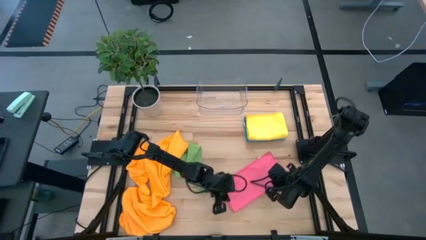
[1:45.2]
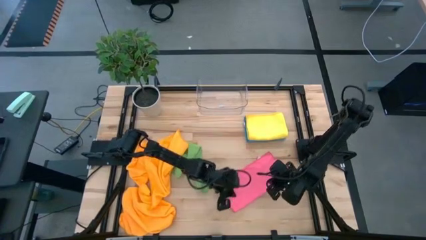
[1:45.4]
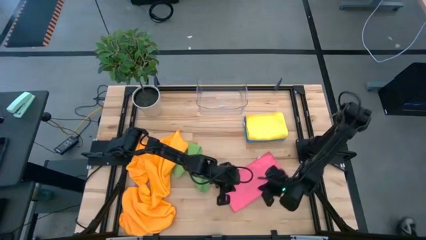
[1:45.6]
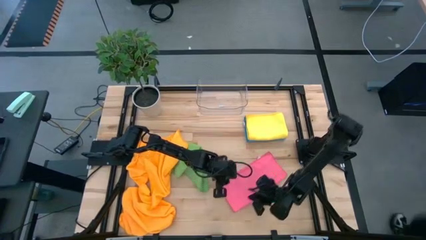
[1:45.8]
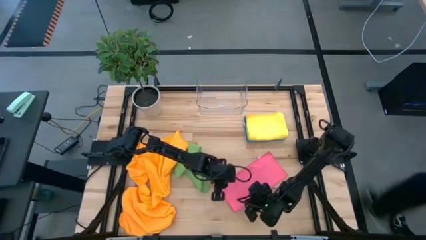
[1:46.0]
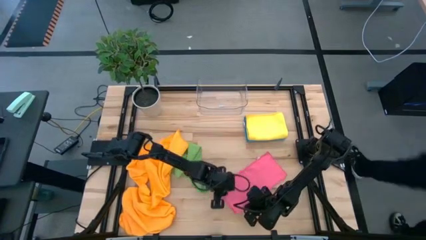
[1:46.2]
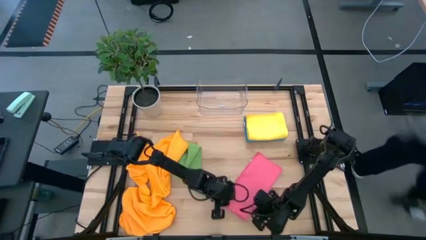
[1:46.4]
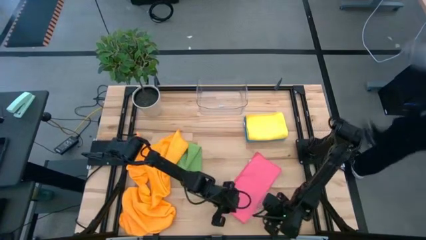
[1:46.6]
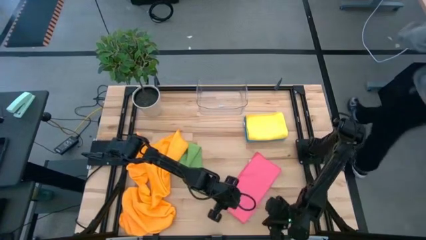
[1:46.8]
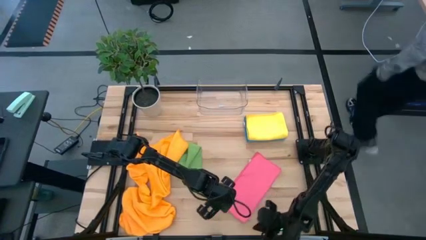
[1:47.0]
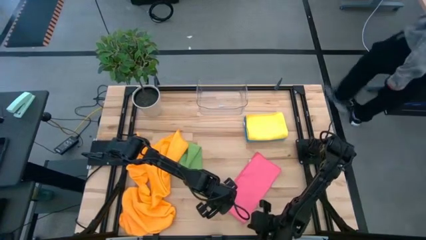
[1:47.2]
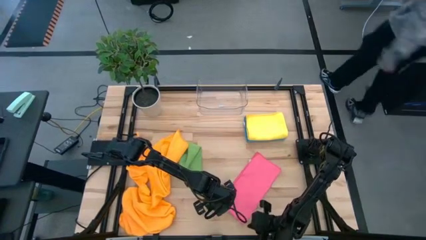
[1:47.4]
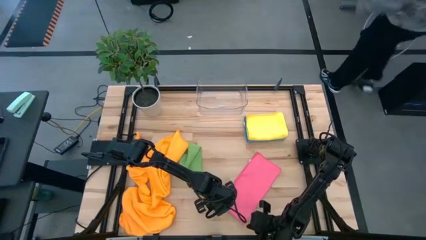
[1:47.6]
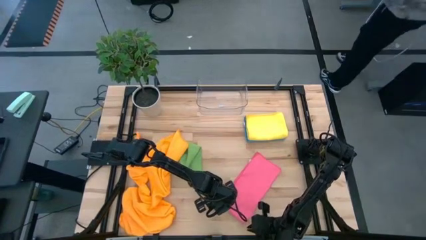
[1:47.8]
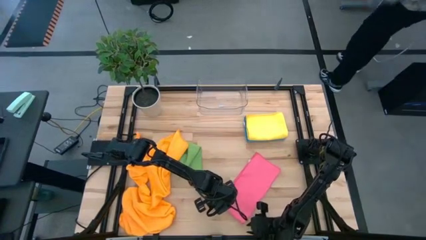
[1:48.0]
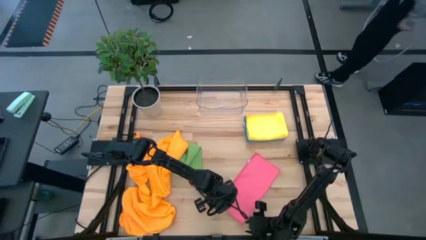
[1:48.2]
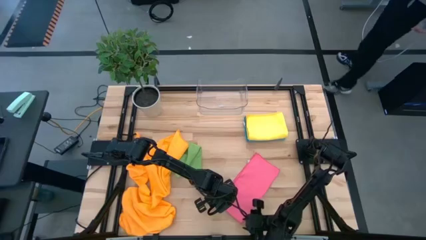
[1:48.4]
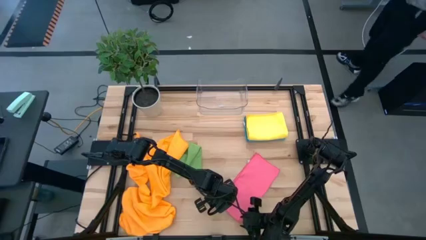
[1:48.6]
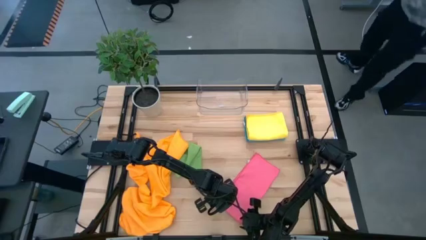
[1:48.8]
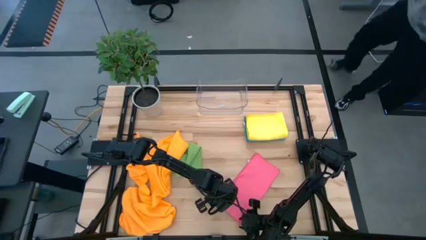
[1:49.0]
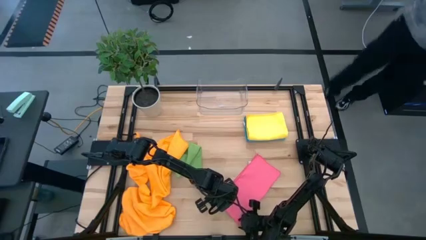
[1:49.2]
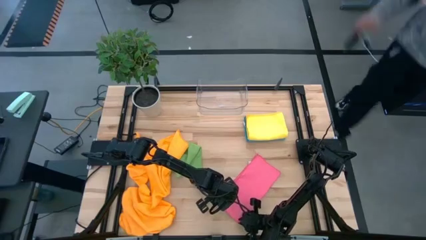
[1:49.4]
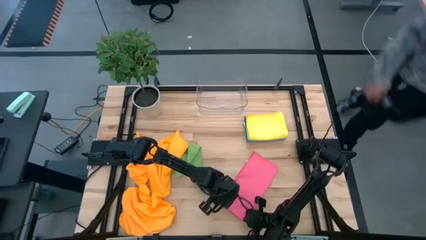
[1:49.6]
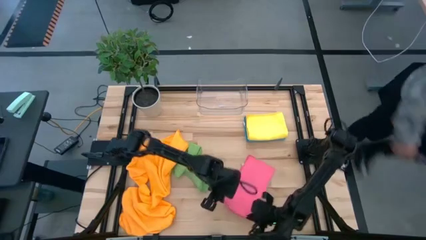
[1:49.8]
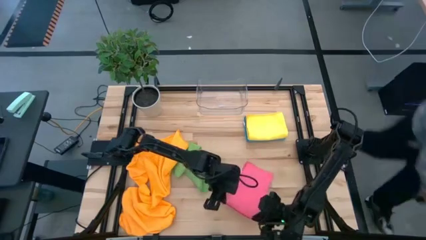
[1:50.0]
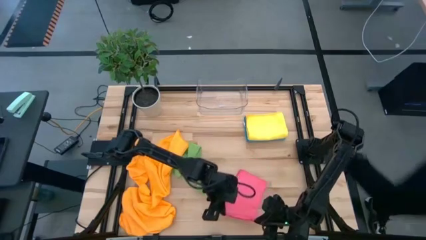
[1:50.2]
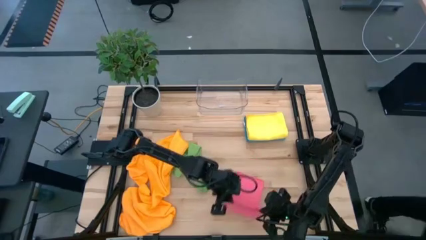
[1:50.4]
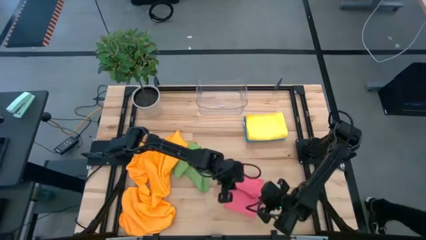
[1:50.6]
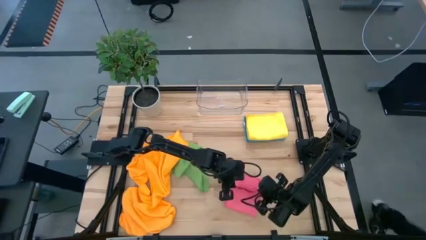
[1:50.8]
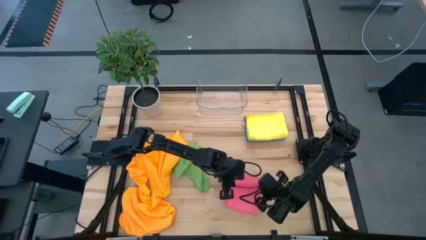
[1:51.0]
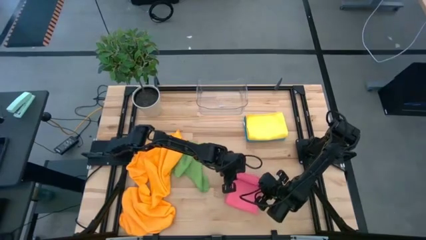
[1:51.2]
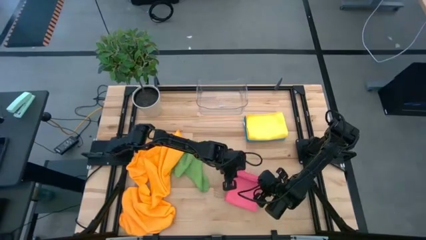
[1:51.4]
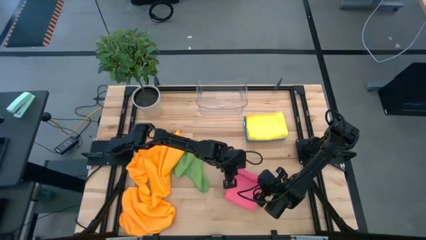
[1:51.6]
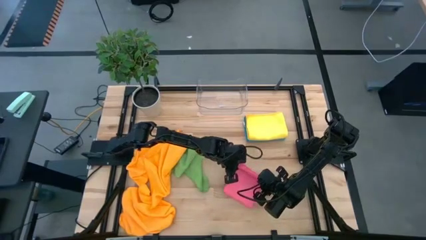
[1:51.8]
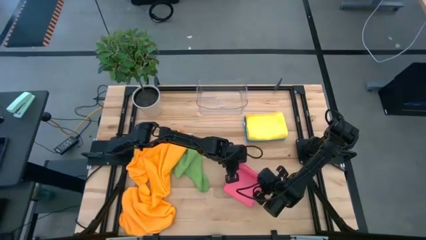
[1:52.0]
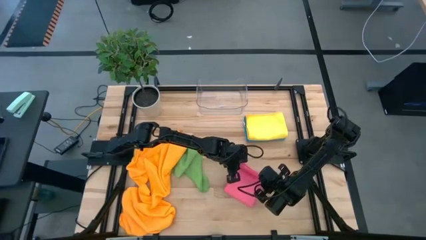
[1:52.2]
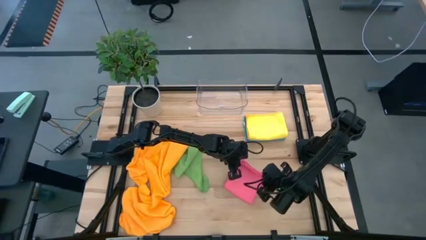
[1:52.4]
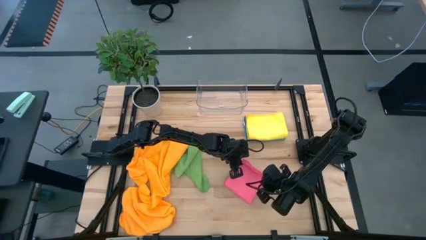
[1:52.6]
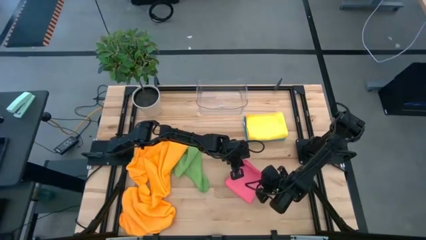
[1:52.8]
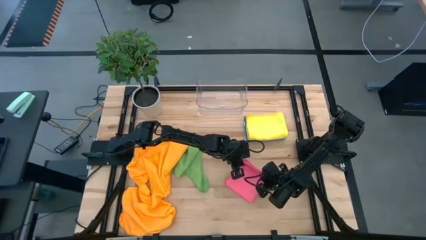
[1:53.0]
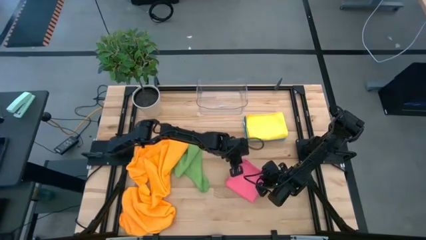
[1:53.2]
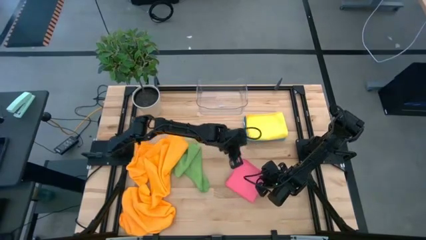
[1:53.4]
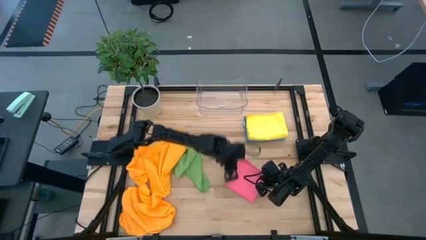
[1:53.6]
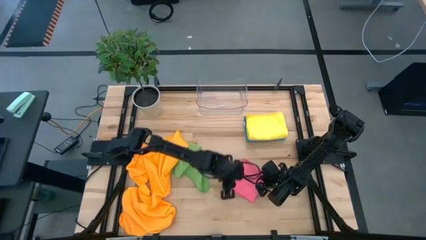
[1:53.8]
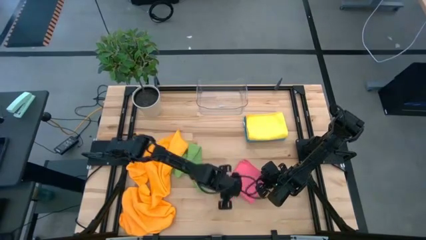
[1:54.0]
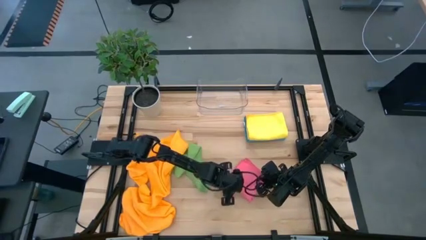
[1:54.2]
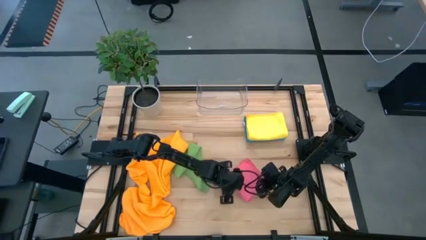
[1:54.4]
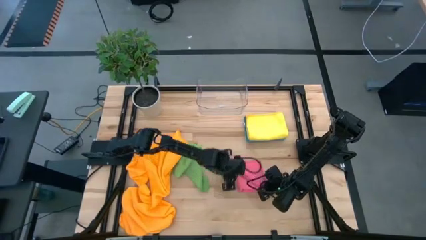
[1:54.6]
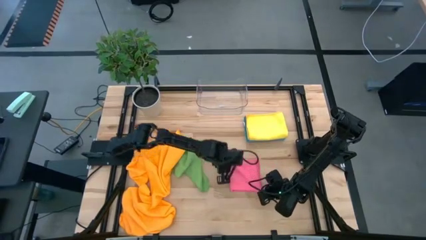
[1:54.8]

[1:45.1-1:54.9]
Task: Fold microfiber towels
Fold the pink towel

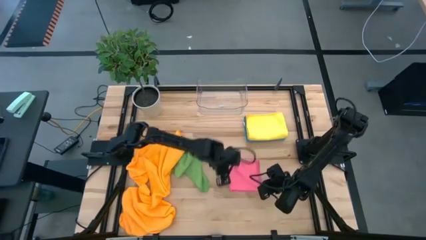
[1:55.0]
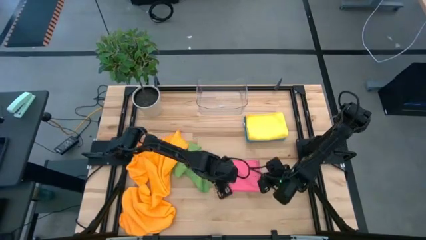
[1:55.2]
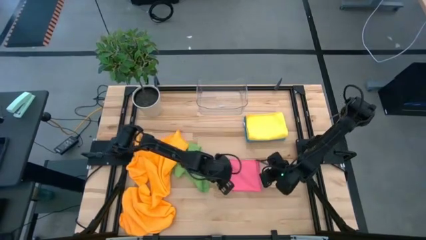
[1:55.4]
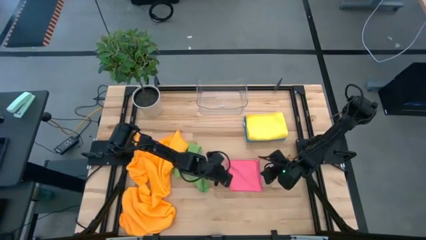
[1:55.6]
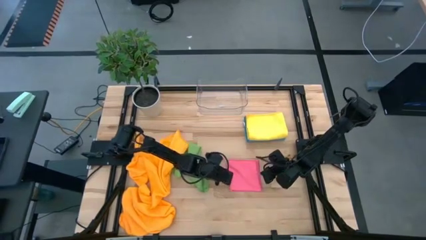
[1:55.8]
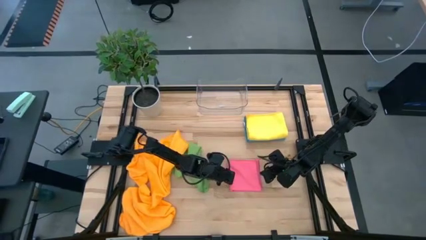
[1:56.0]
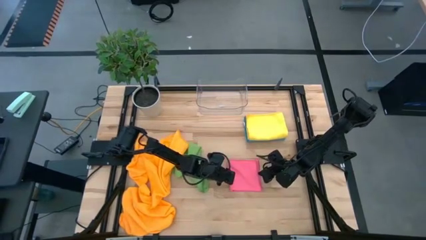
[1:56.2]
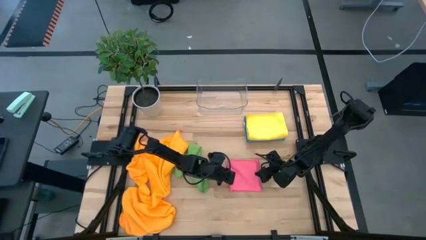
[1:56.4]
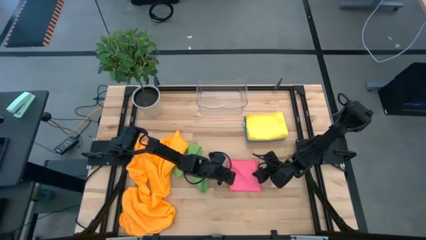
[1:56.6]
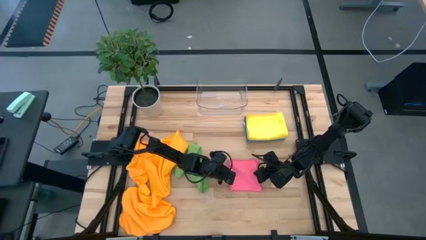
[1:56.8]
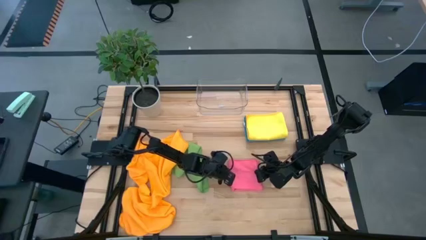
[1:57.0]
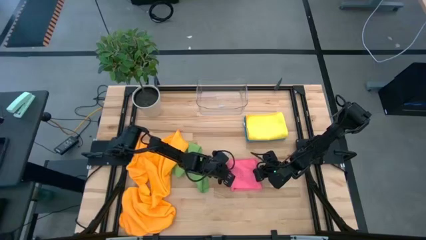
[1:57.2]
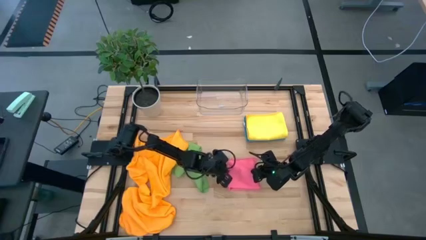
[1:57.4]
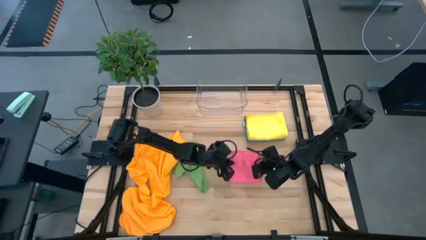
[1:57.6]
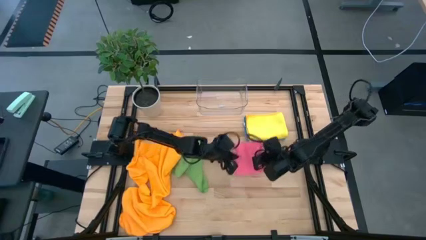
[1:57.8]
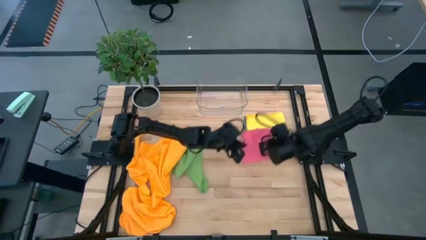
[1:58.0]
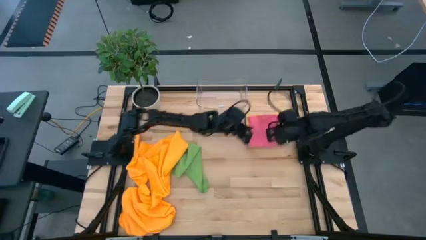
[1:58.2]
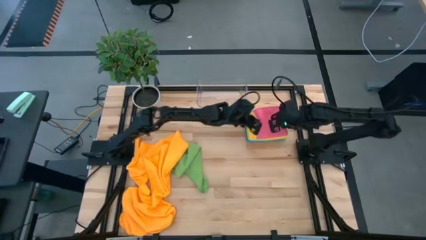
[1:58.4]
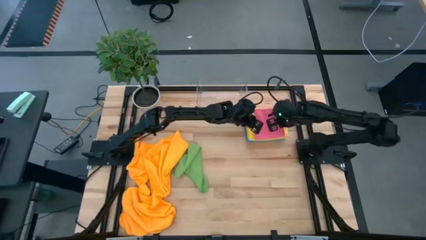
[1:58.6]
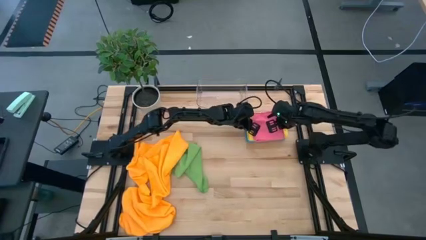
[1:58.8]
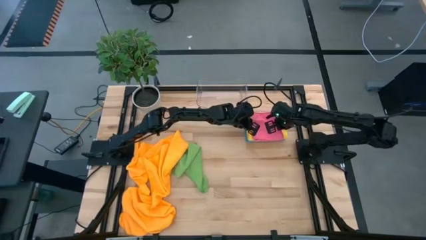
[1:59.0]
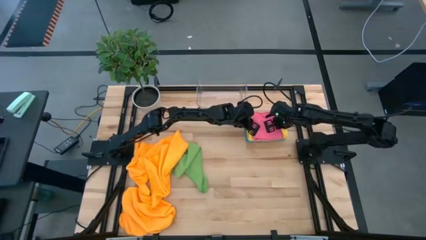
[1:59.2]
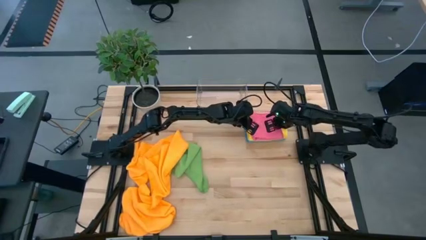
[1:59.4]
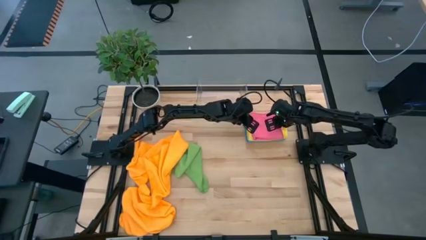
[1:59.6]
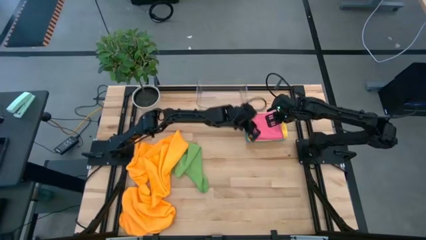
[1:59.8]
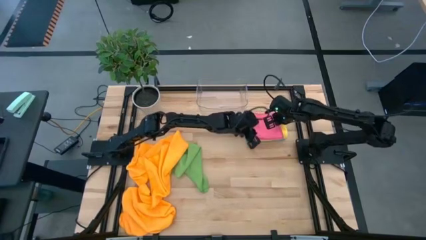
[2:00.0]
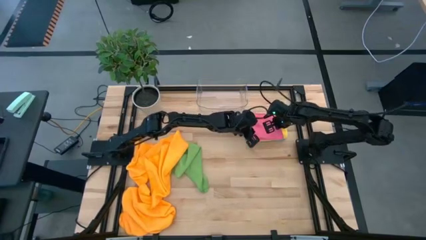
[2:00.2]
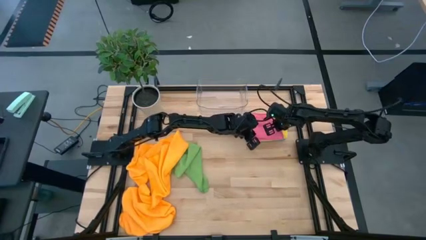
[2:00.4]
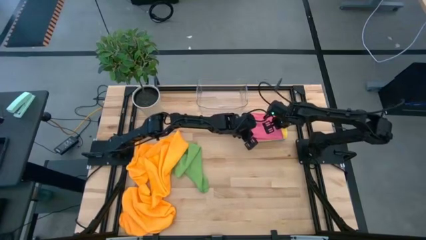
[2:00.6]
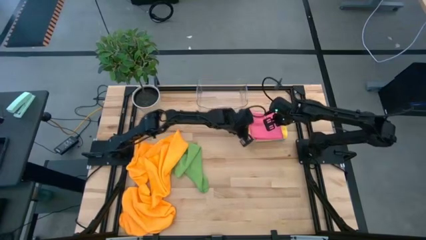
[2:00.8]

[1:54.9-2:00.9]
Stack the pink towel on top of the yellow towel

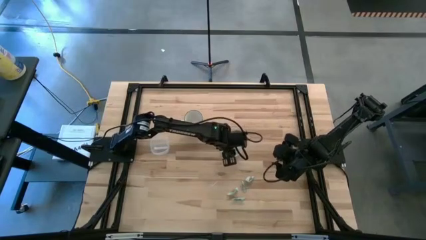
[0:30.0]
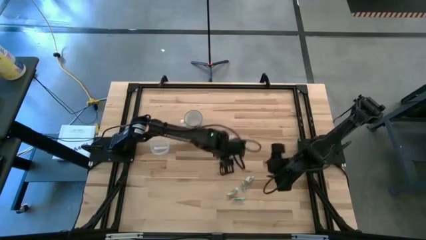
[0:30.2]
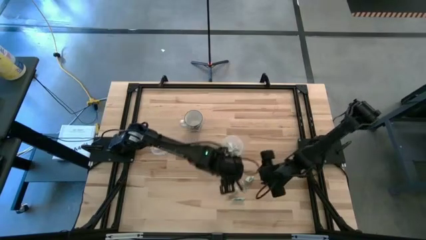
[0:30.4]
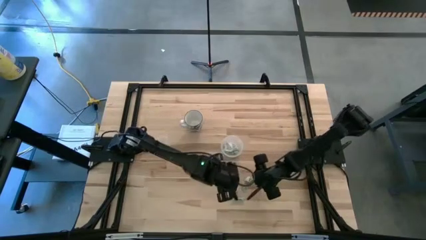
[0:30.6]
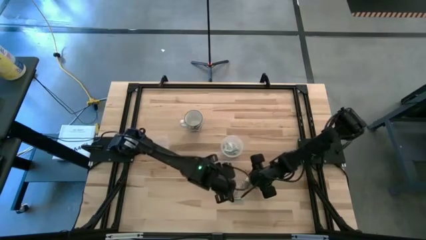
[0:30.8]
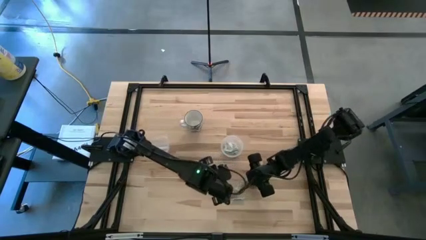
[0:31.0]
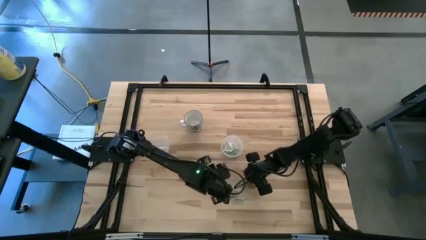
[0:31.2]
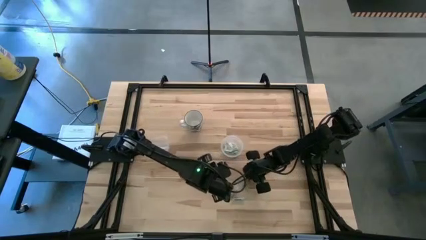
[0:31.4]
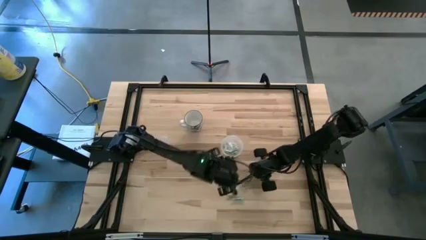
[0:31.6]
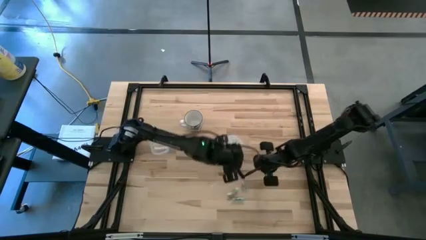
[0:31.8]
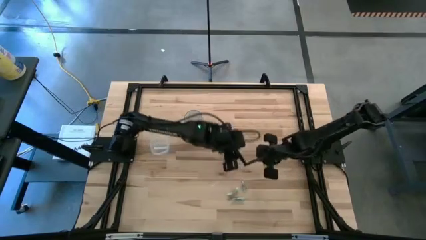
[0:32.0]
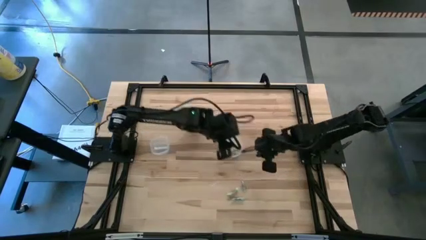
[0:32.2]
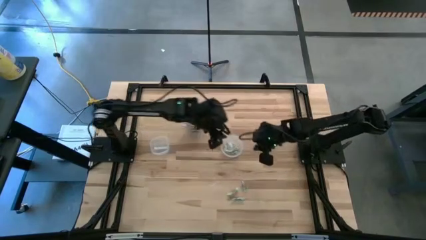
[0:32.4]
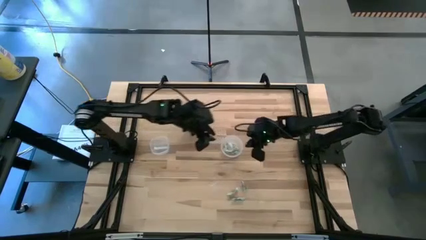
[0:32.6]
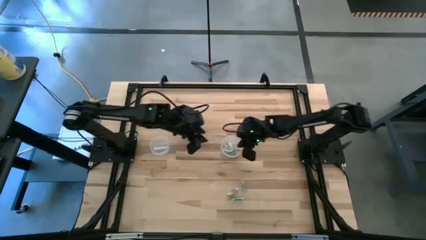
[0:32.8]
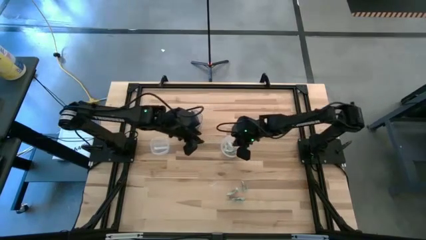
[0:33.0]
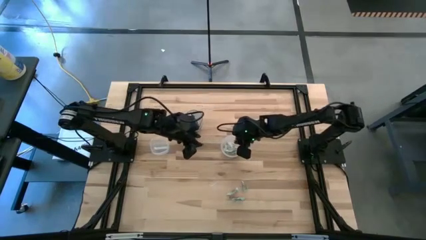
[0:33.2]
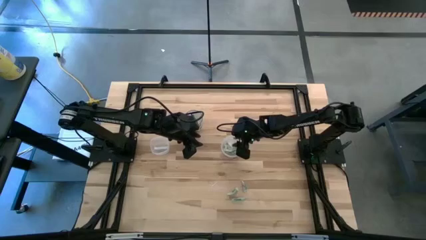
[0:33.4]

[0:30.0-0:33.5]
Task: Pick and place Stevia / Truvia into bins
Put the green stevia packet into the right transparent container
